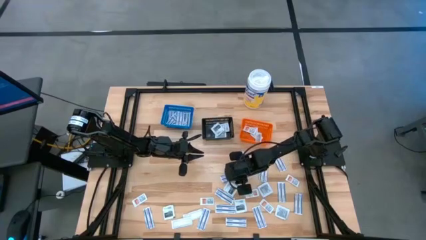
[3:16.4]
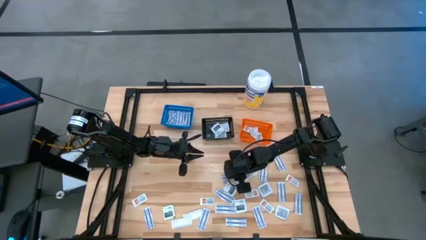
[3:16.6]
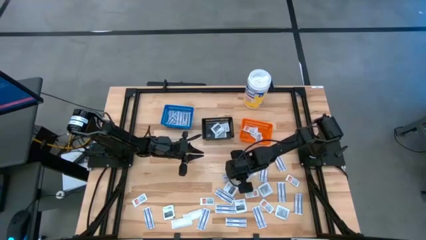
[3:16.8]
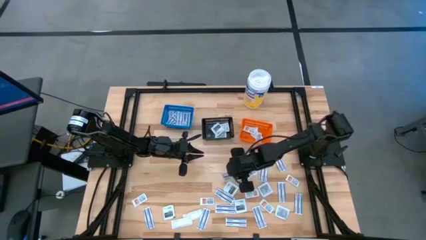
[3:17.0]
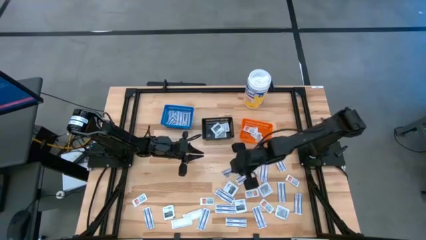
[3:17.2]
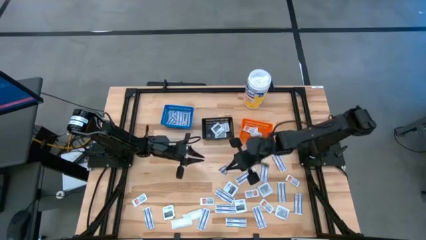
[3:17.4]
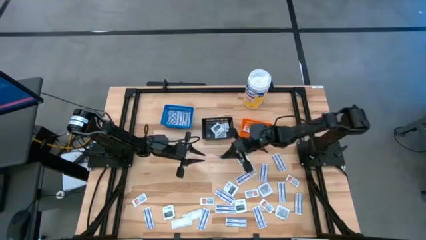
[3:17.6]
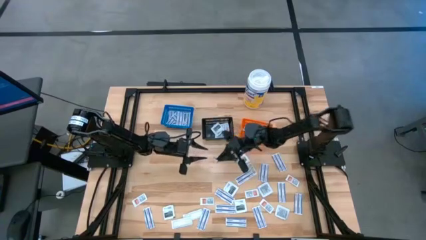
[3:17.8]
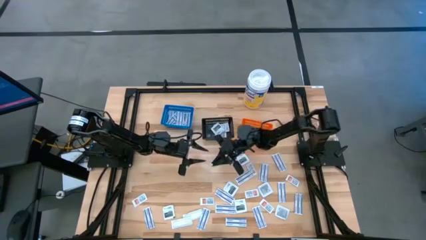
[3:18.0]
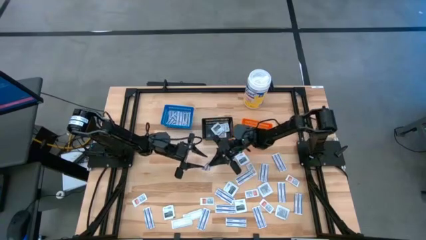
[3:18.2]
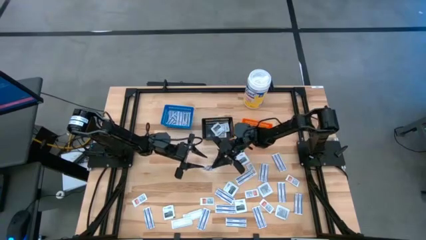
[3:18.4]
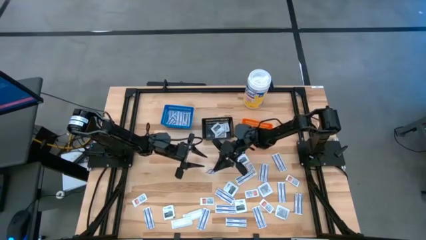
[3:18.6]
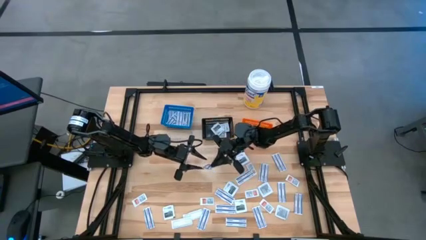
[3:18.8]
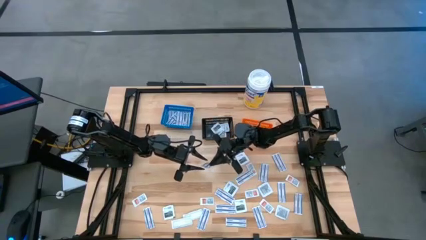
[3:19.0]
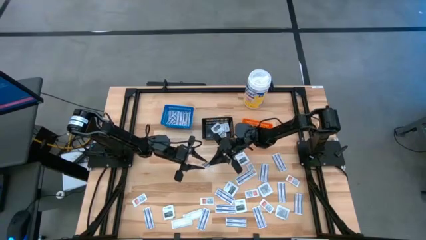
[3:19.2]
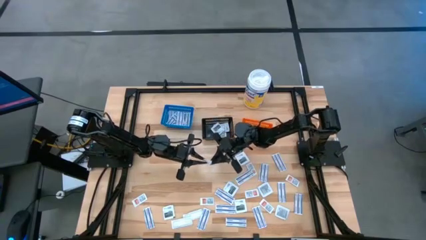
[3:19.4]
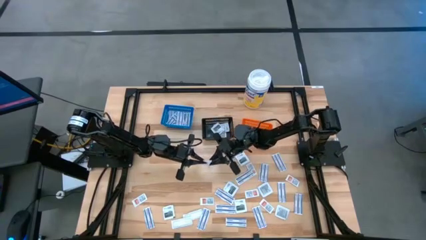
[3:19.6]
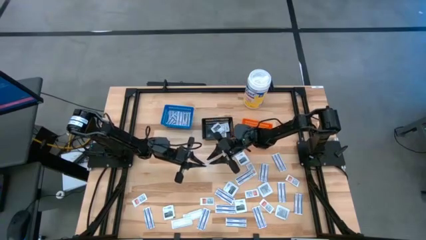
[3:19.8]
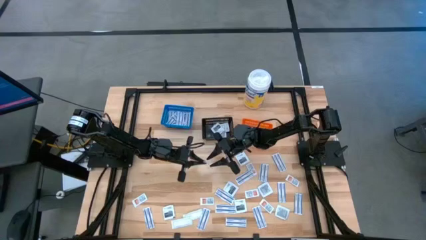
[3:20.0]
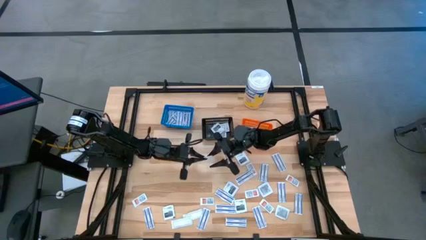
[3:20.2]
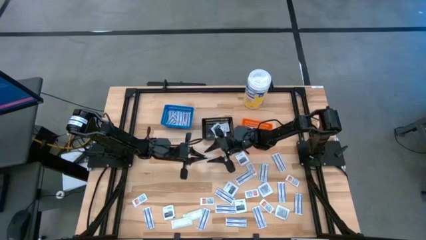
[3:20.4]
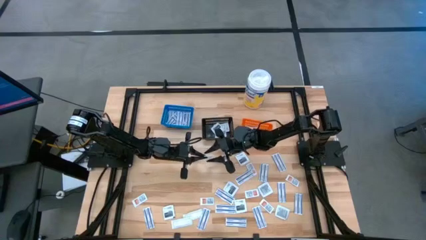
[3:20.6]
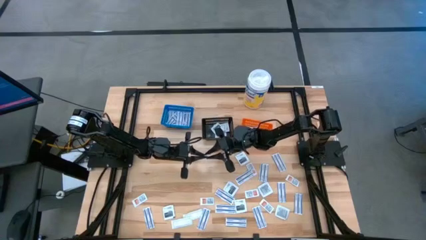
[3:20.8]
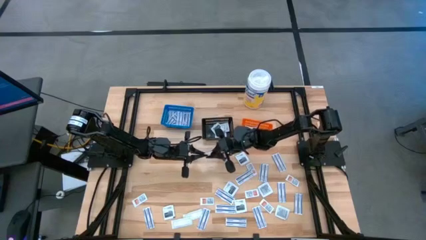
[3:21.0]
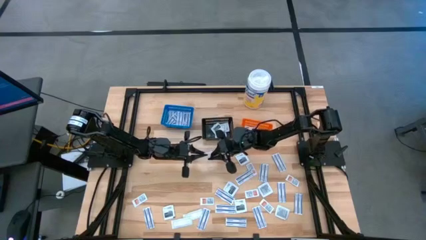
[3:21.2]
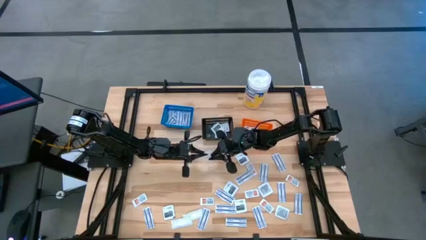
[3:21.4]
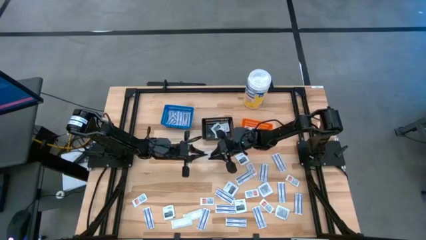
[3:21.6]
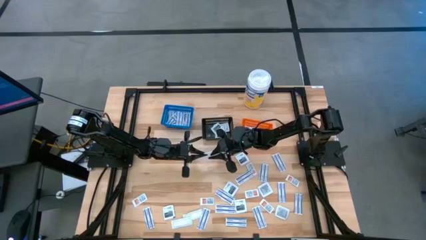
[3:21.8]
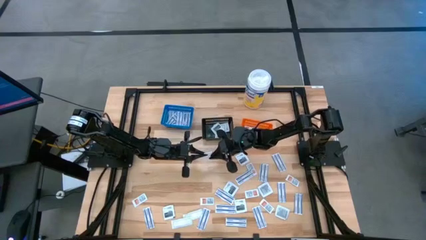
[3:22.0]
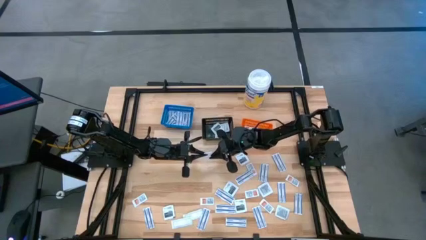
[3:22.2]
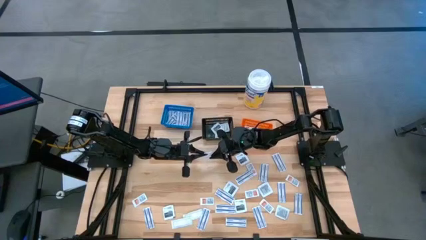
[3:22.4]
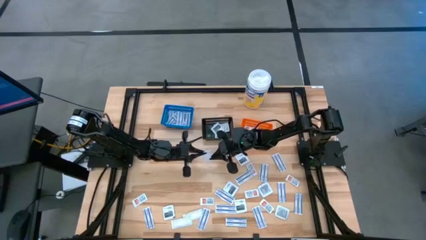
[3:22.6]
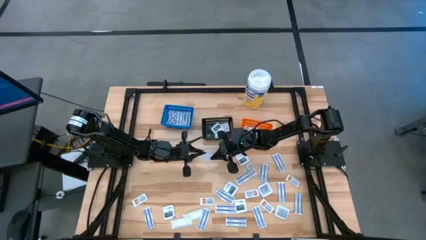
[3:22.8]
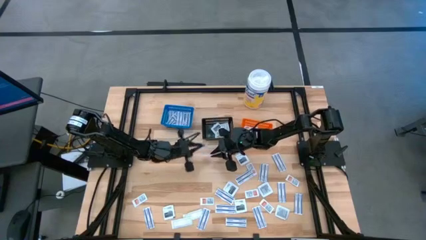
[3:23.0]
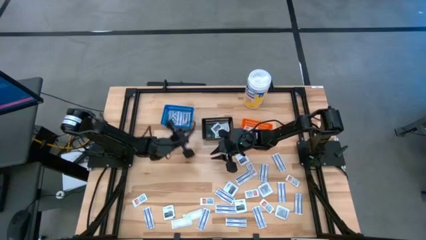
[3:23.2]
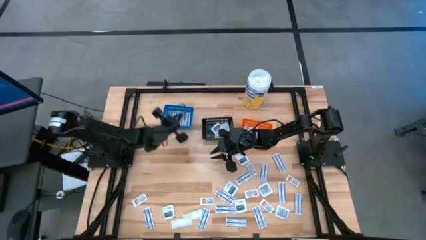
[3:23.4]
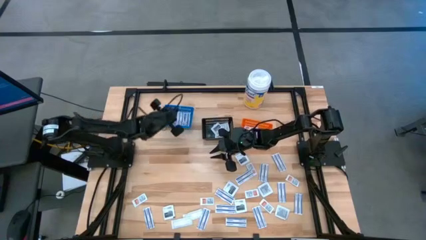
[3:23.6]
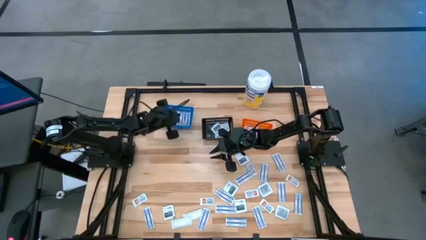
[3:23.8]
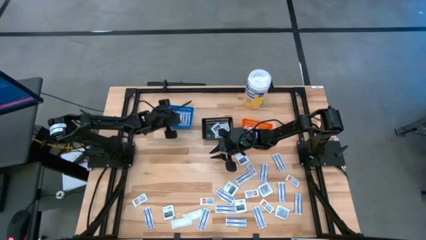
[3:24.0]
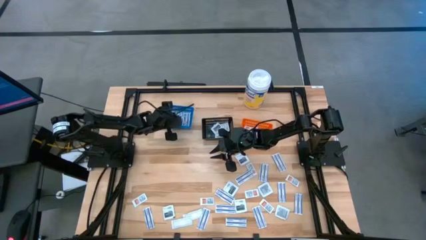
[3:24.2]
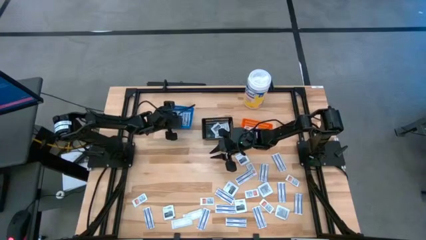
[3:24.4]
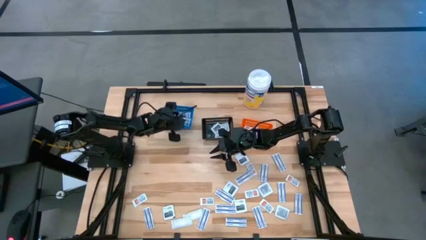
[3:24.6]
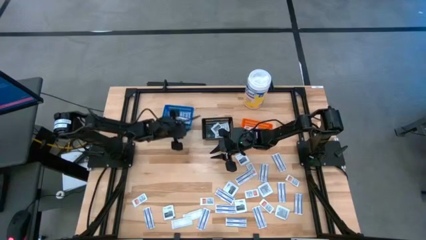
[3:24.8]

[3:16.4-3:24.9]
Task: Pick & Place First Aid Supplies
Put the bandage into the blue container

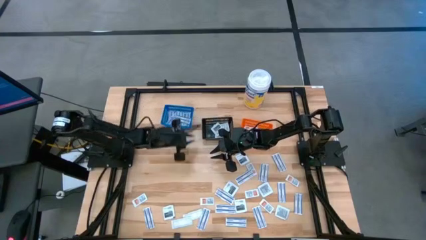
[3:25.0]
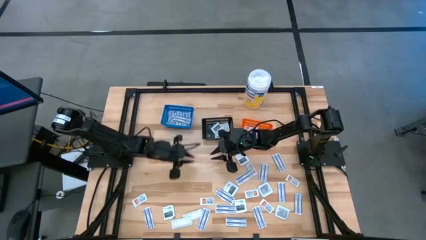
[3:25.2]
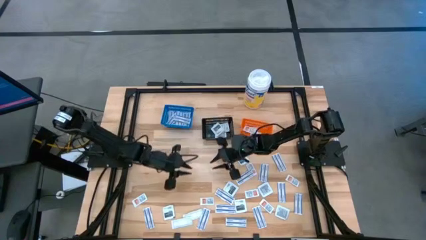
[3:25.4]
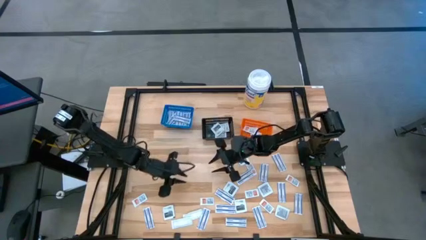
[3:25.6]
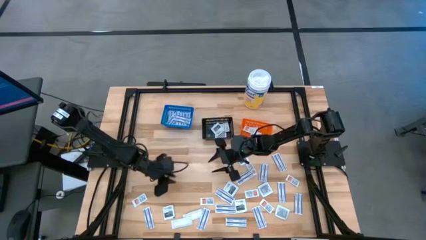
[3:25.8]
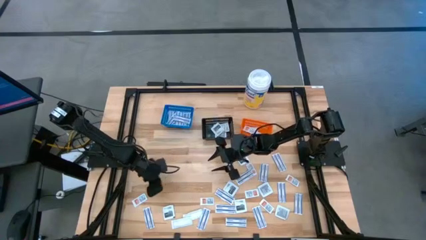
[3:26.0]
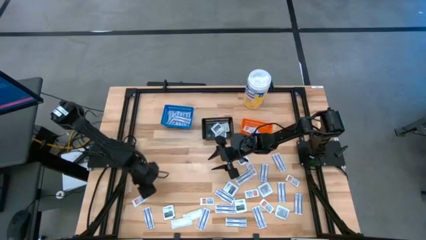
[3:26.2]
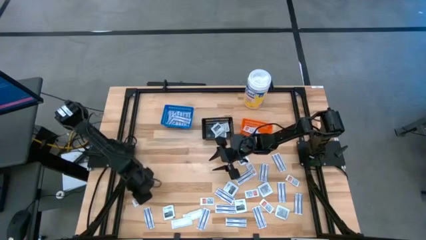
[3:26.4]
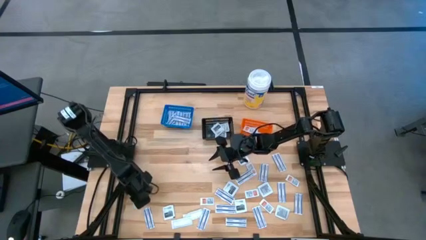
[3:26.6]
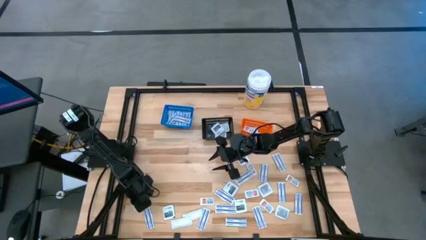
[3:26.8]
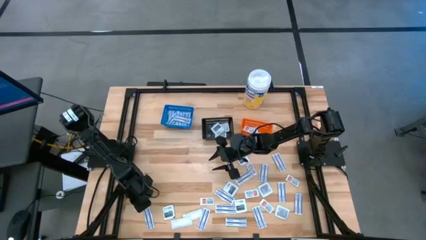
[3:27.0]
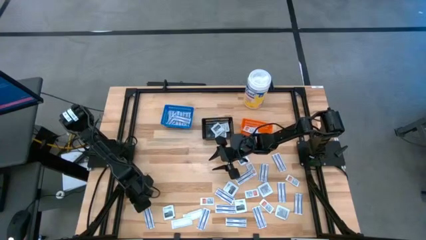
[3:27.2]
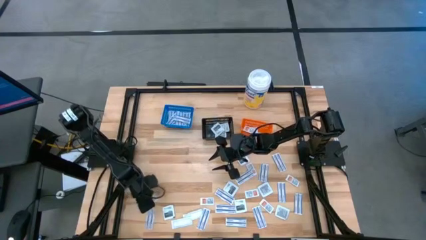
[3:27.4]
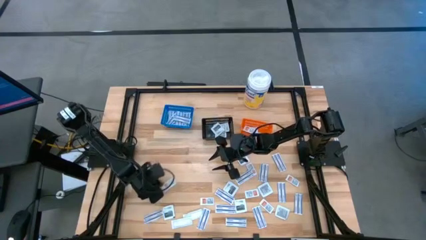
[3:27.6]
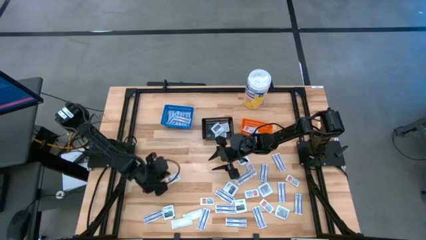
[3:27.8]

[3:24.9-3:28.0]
Put the ointment pack into the orange bin

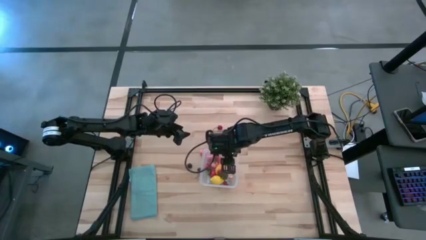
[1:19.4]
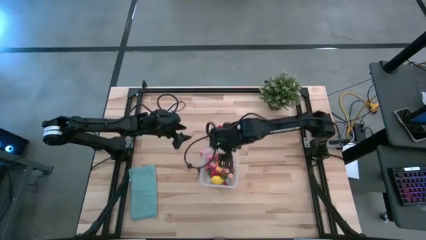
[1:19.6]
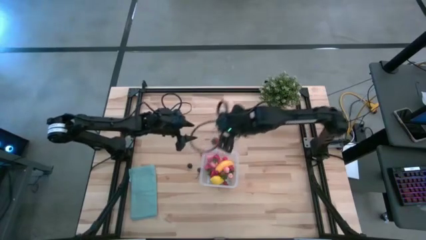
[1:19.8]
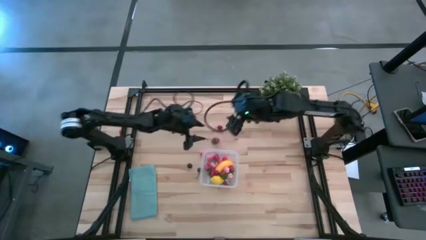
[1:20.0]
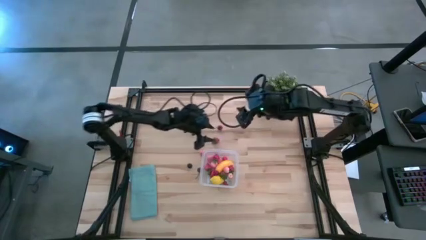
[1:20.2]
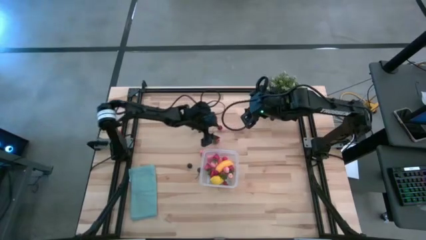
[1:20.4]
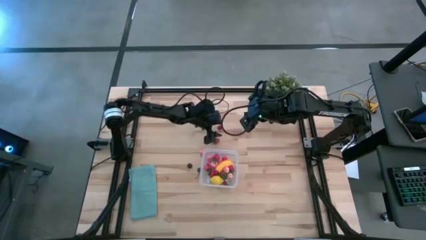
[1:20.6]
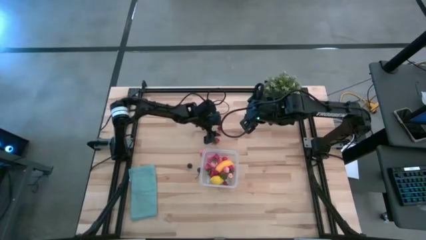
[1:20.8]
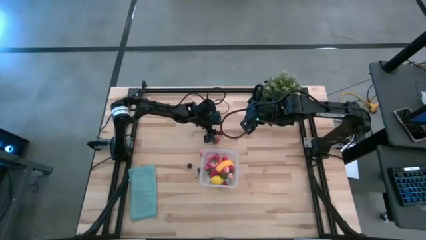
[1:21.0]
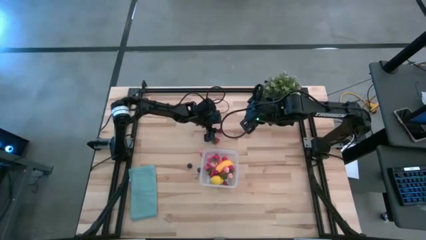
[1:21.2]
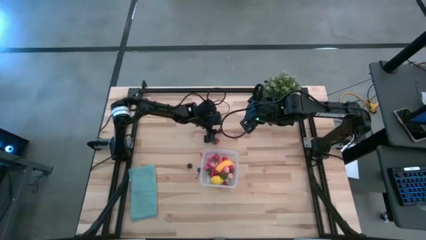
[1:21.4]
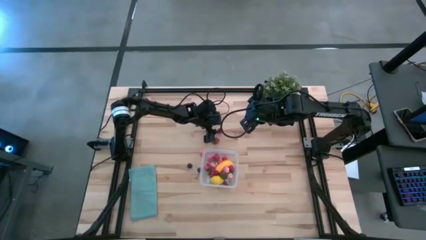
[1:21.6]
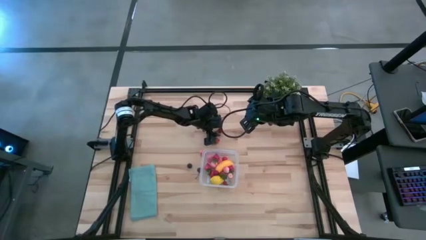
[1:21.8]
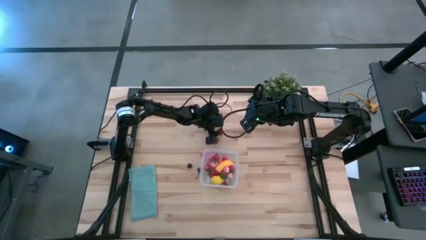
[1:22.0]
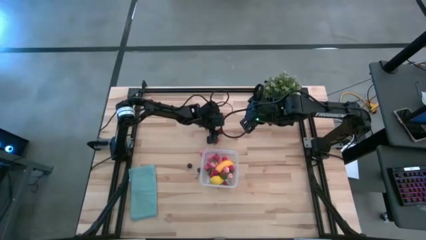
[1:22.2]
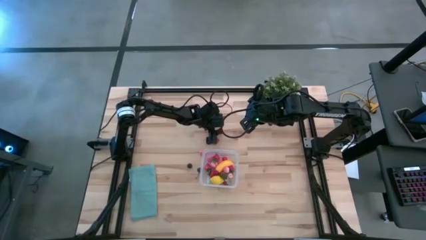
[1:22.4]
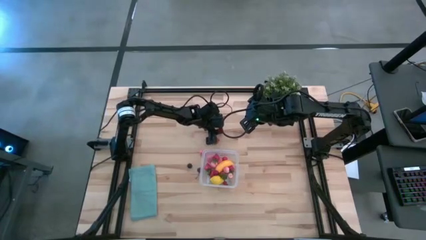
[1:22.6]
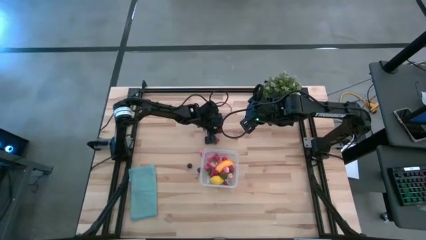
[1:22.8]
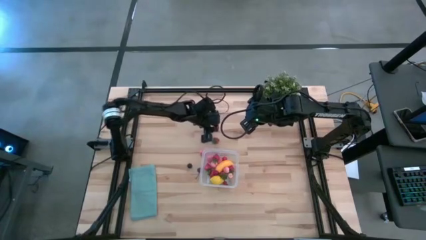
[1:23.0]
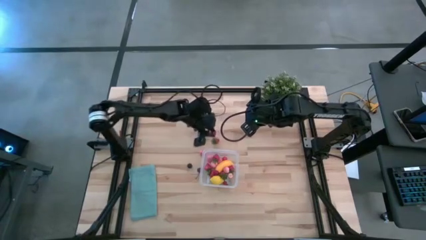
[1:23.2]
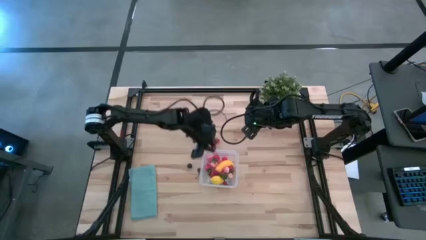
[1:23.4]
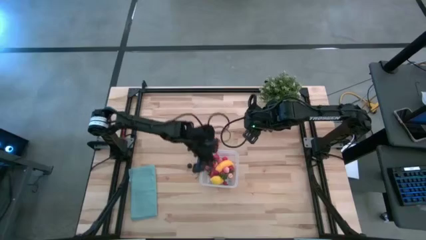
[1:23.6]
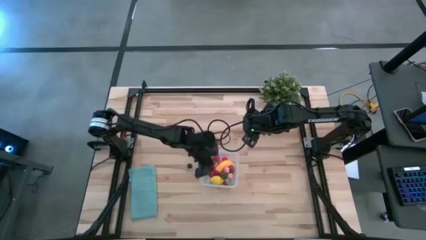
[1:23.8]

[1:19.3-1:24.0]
Task: Pick and placing Produce into tupperware
Put the red cherry into the transparent container

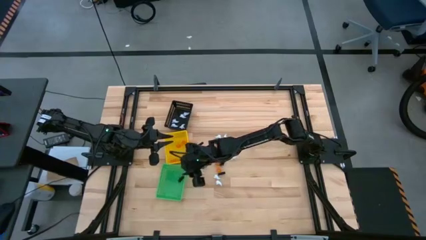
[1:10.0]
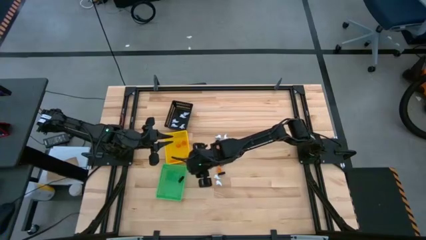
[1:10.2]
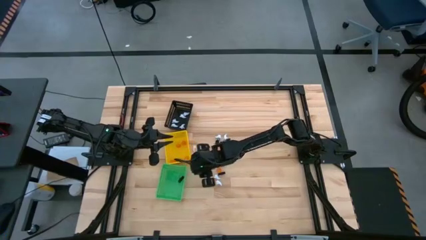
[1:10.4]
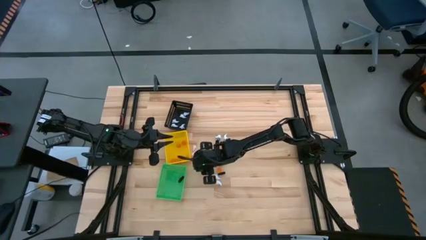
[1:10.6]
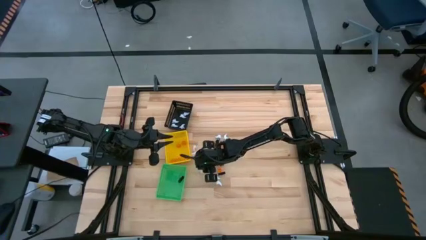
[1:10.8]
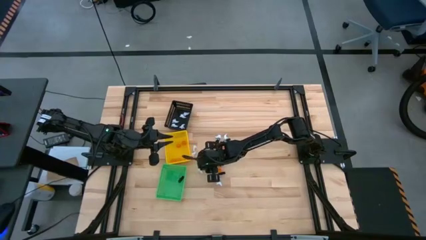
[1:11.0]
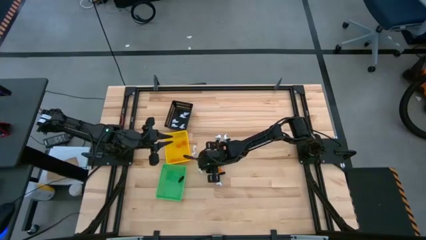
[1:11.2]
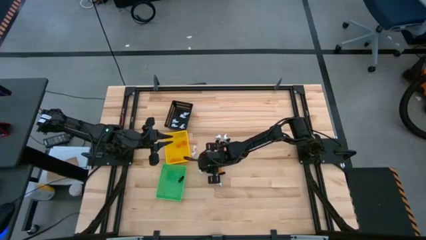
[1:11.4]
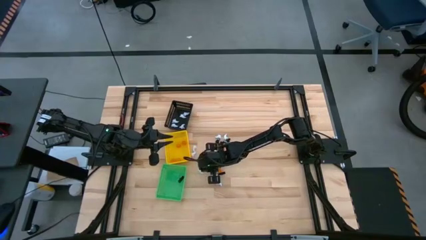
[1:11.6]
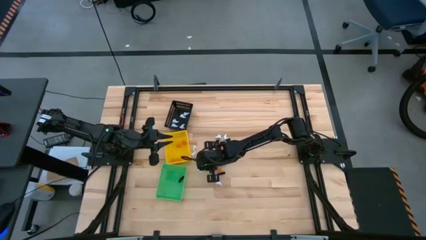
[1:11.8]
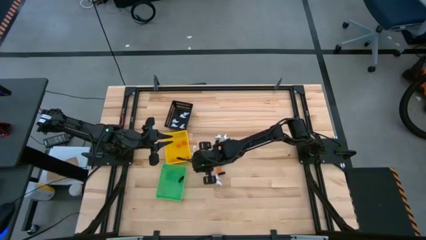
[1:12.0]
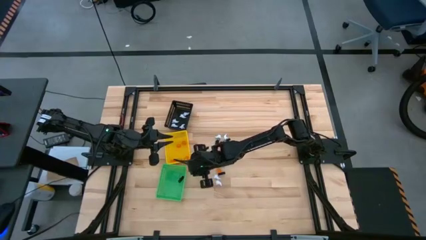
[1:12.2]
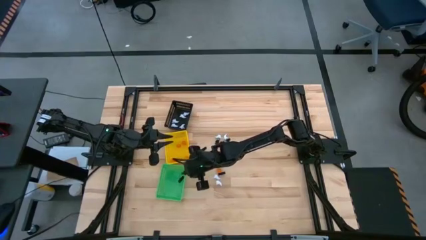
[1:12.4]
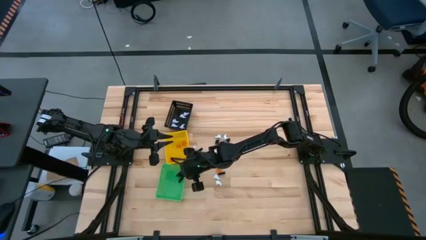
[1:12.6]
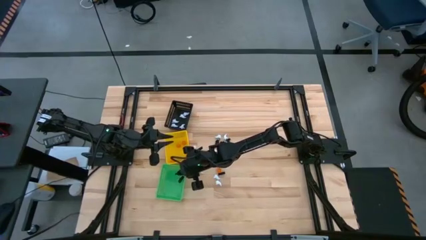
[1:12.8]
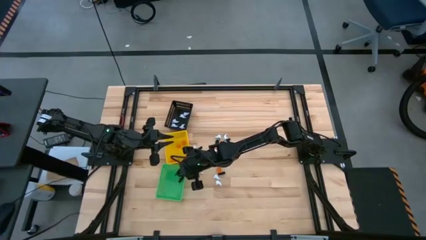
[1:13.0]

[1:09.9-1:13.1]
Task: Sort Halloween decoration
Put the black skeleton toy into the green basket
